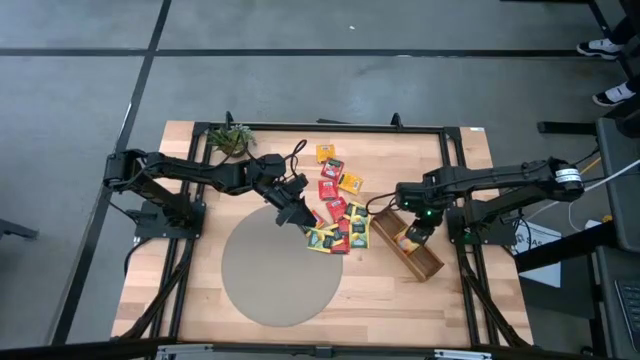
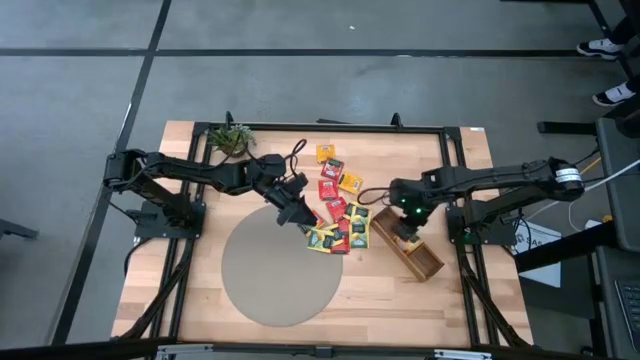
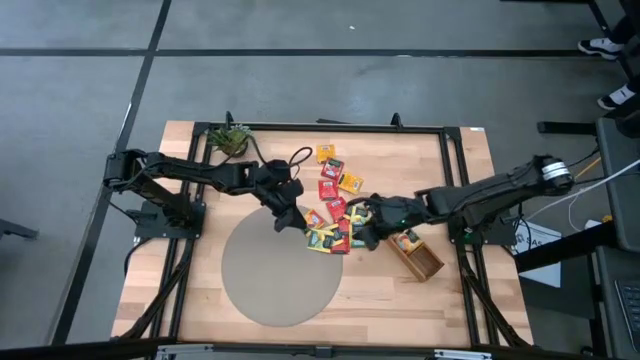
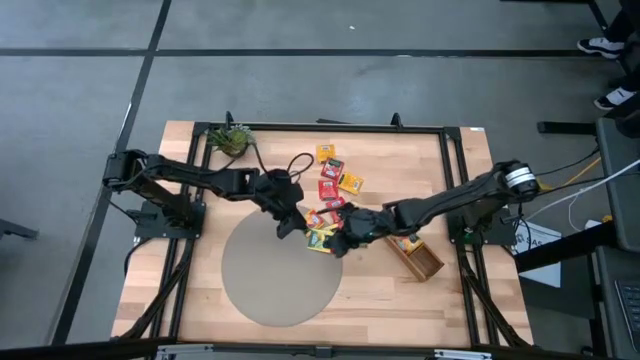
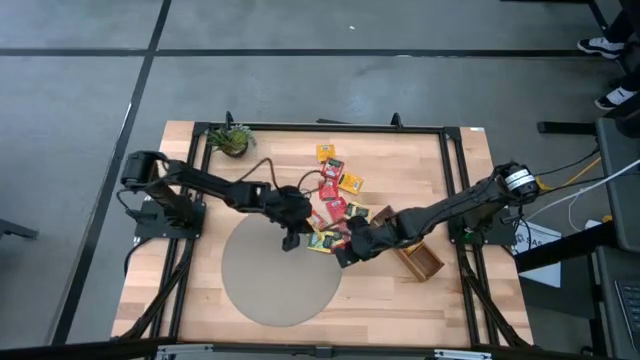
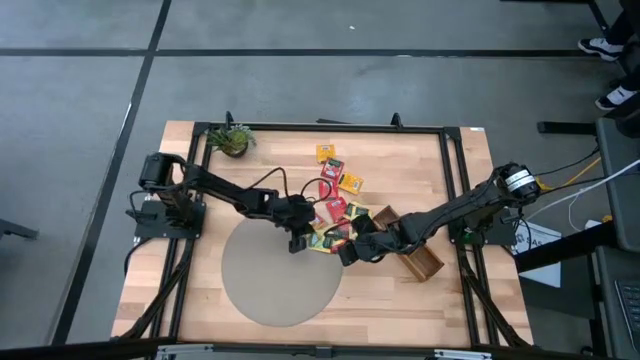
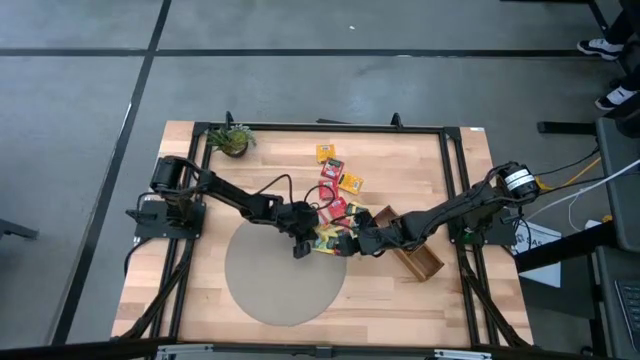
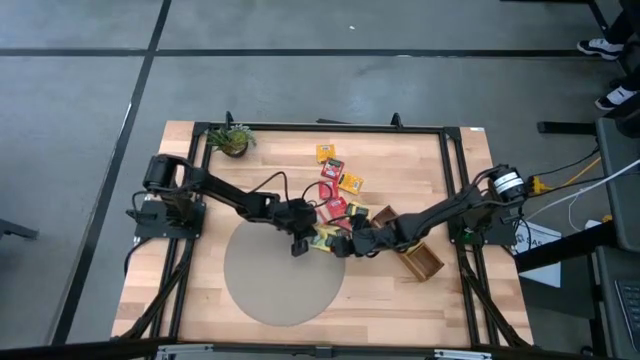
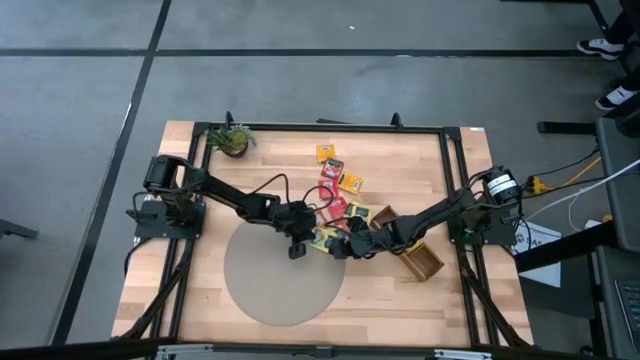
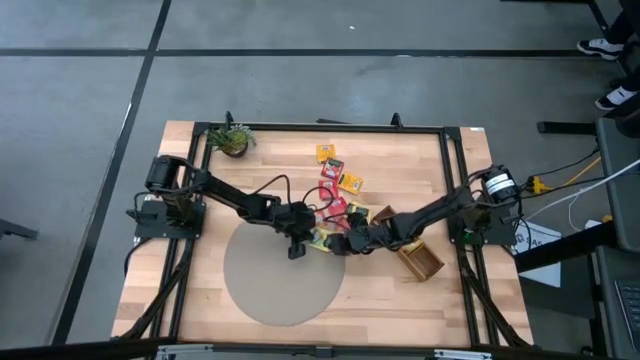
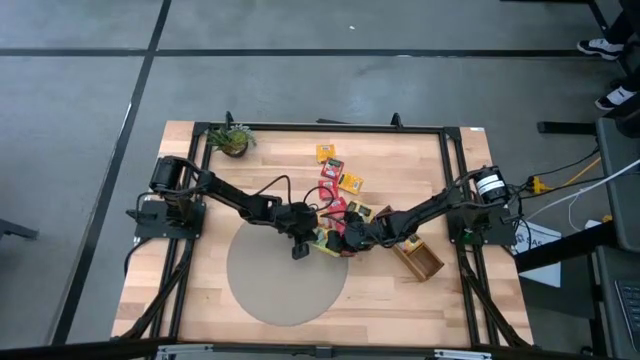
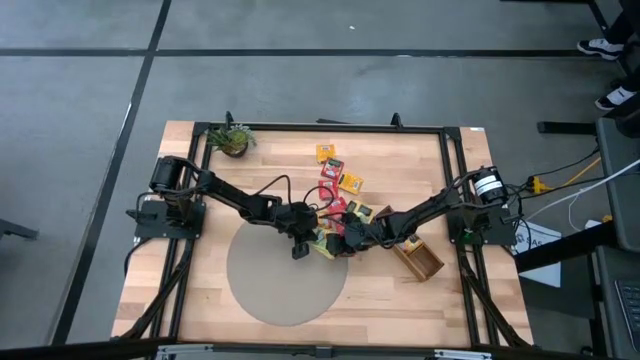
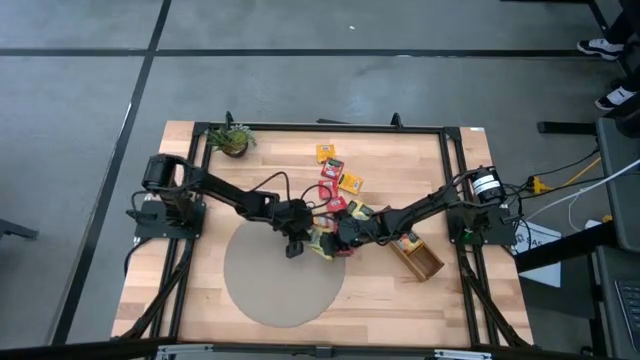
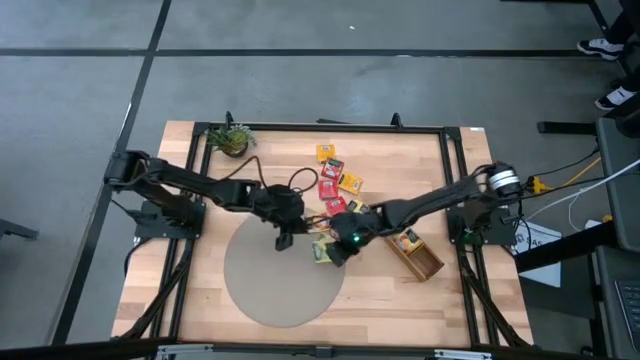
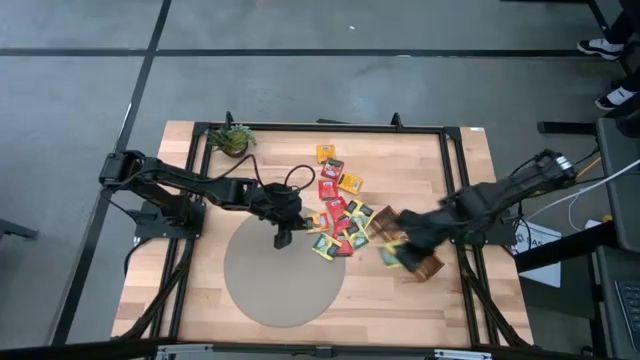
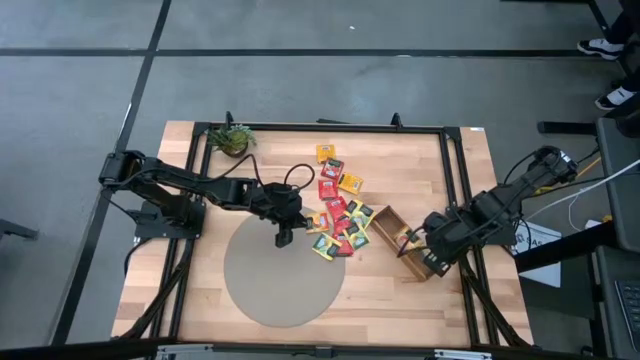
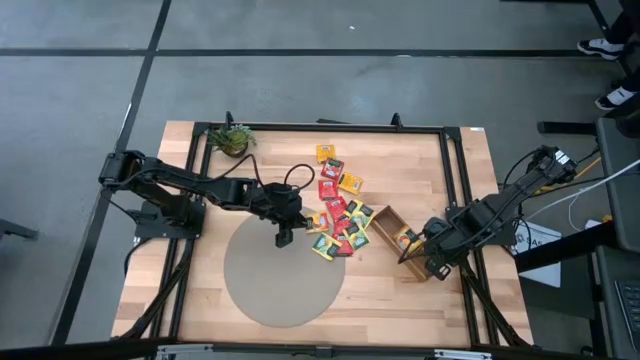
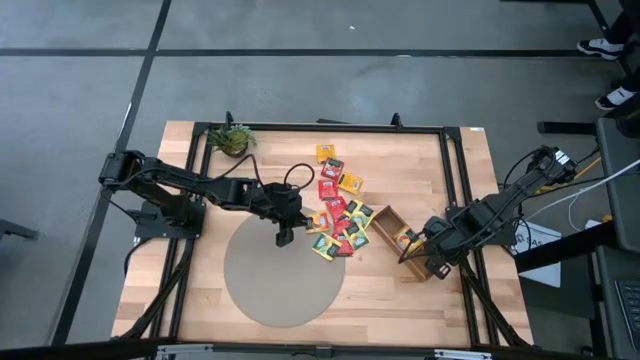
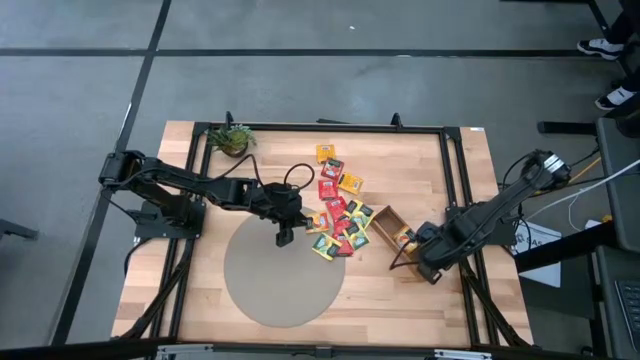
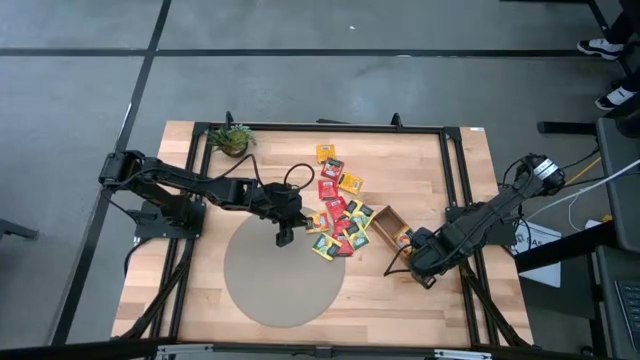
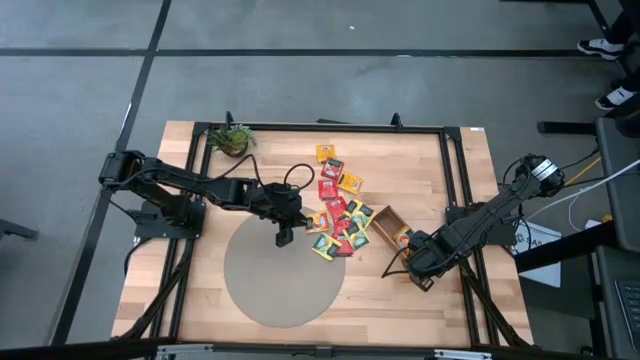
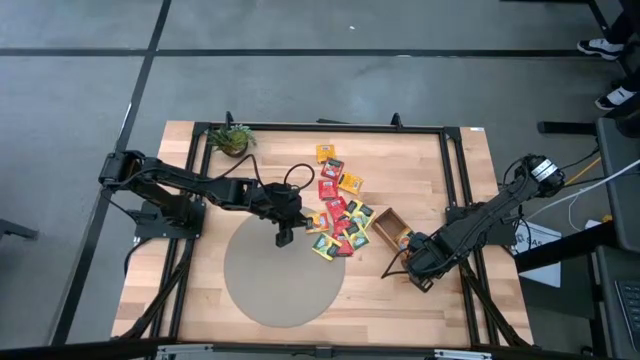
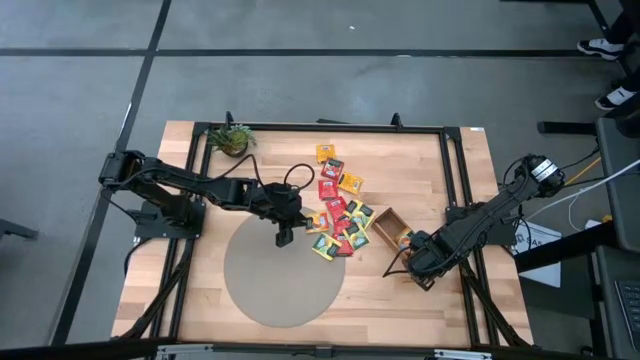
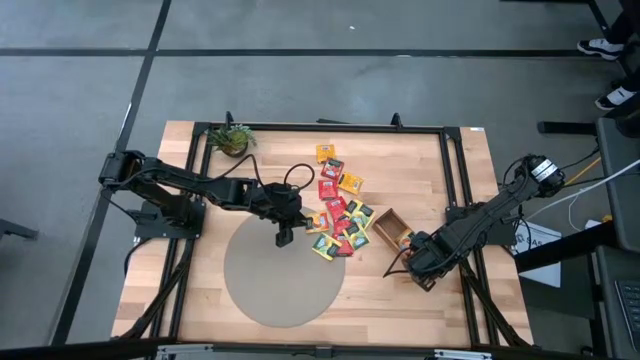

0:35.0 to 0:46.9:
Task: Pick & Place Tea
Put the yellow tea bag into the bottom section of the wooden organizer

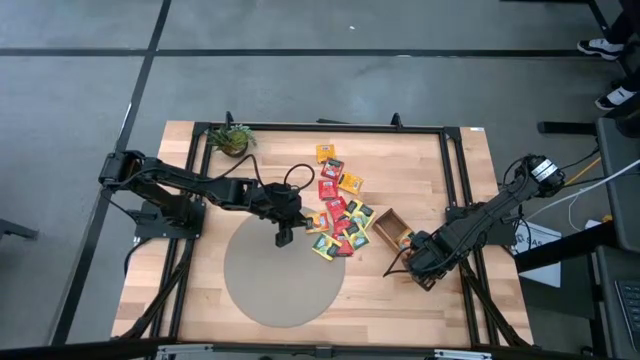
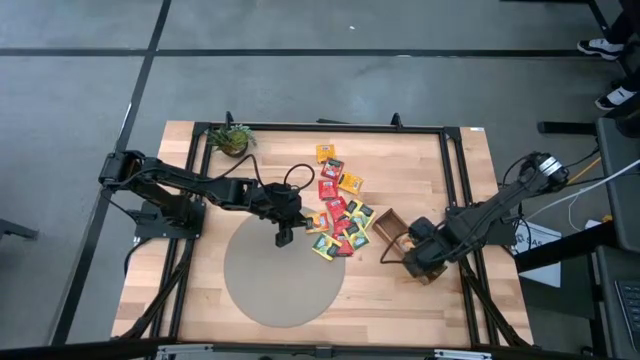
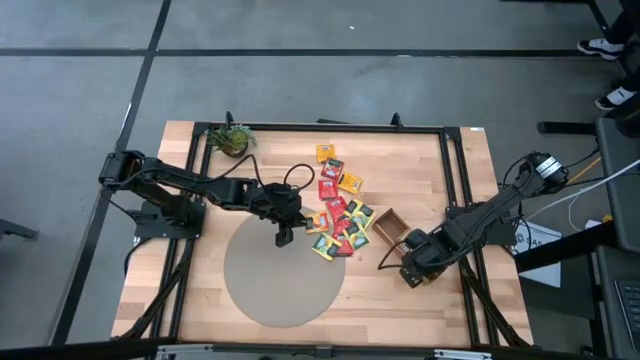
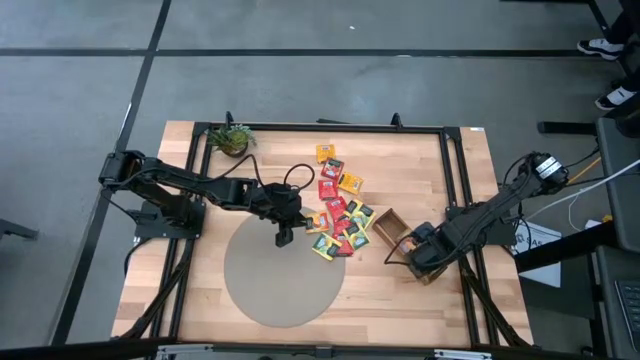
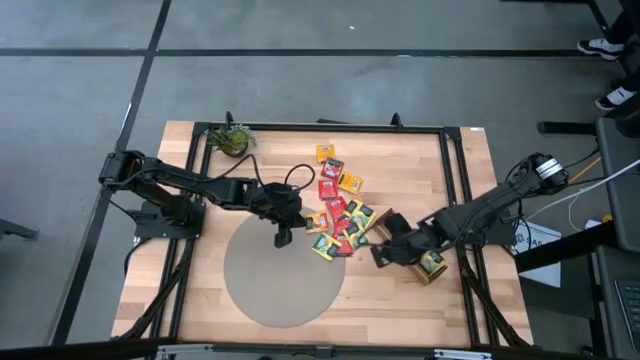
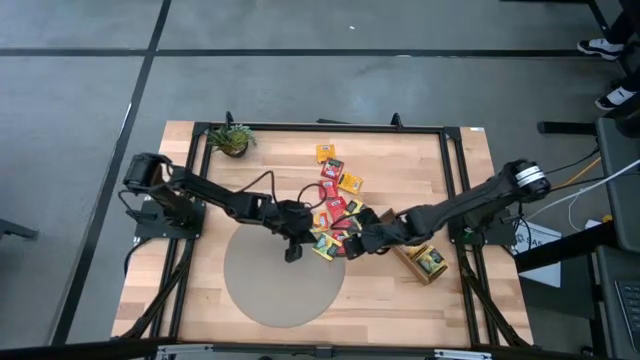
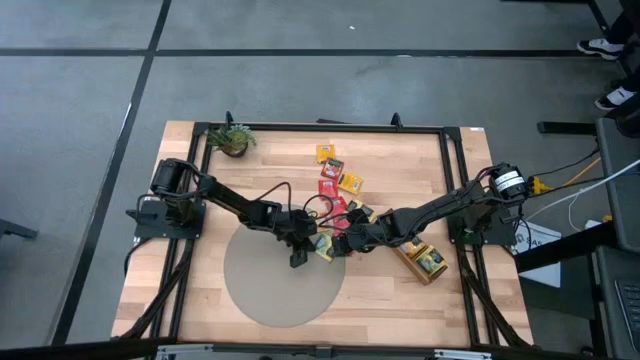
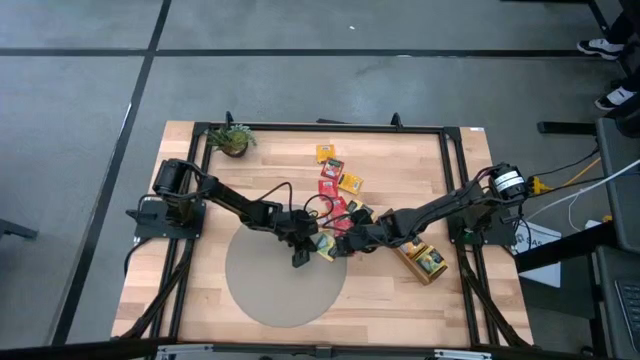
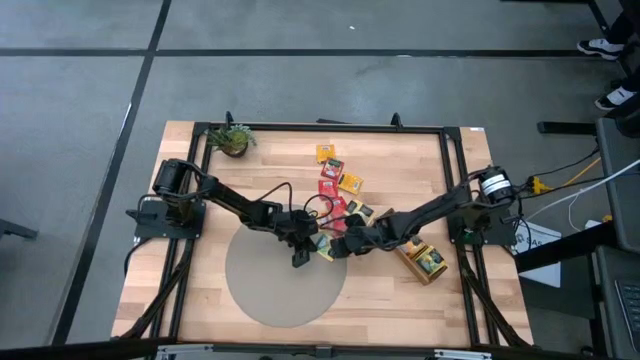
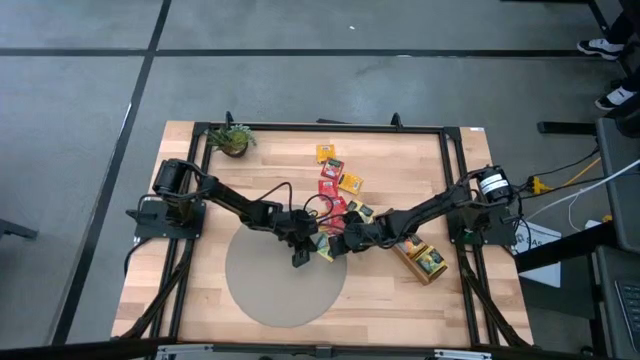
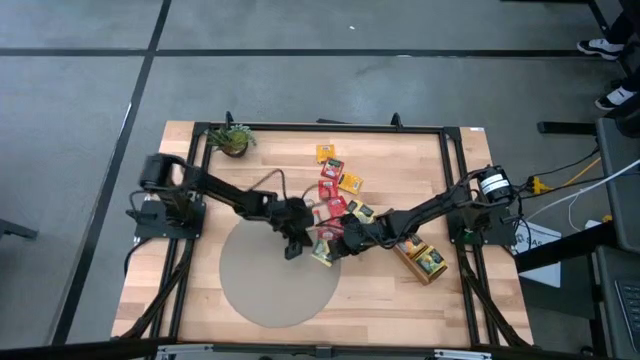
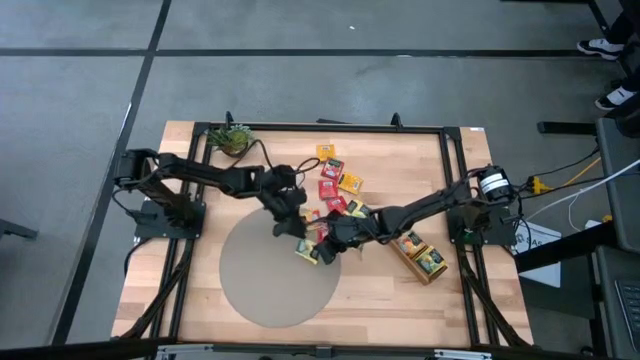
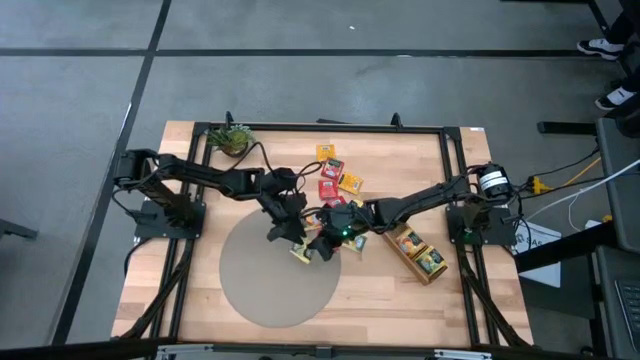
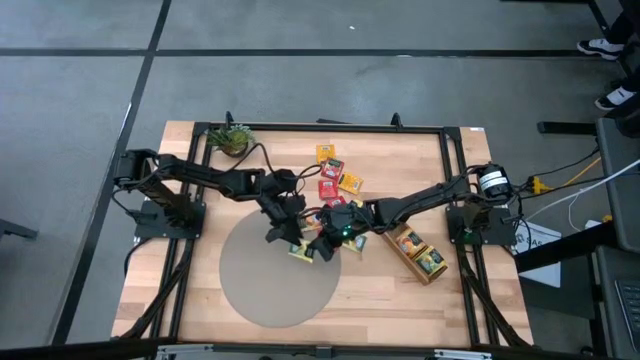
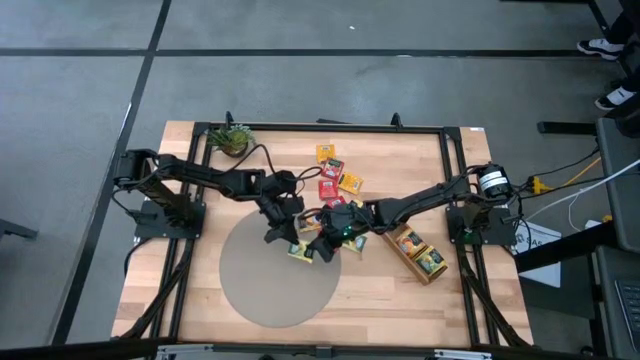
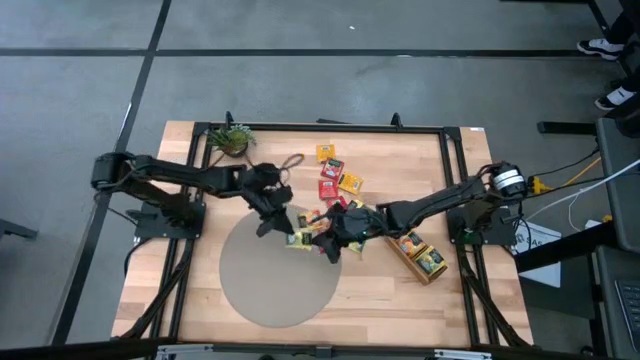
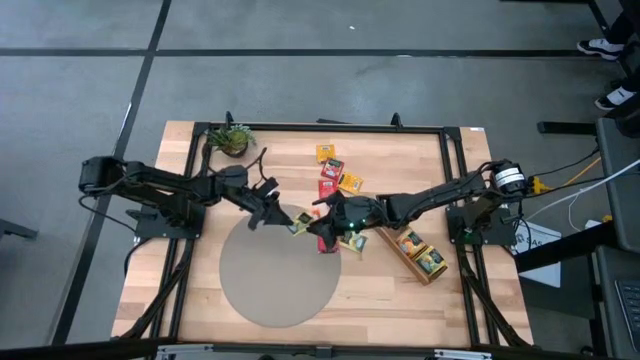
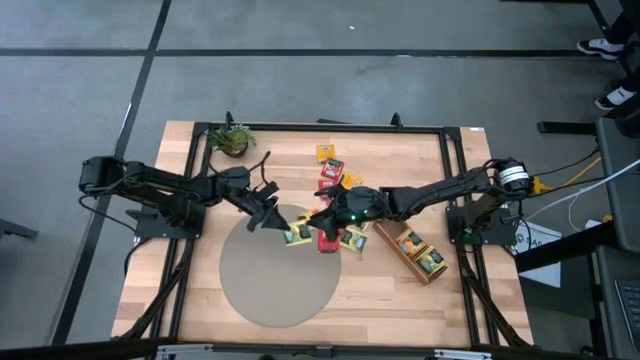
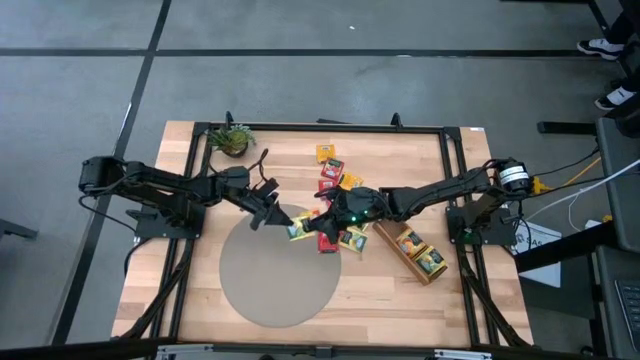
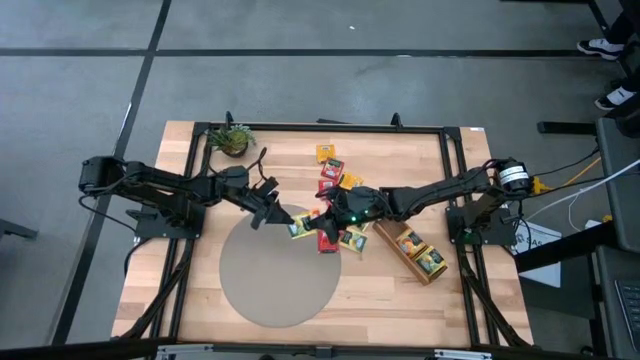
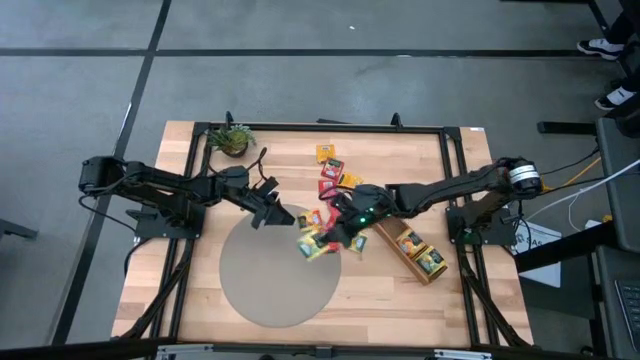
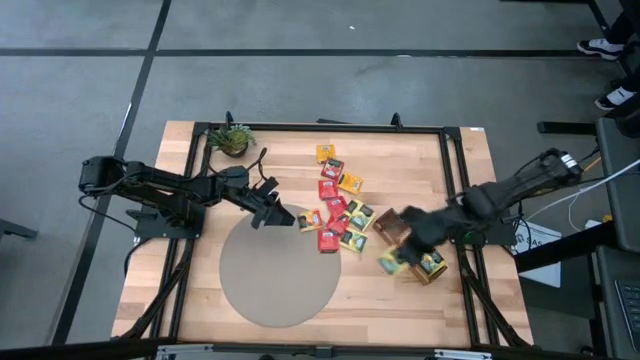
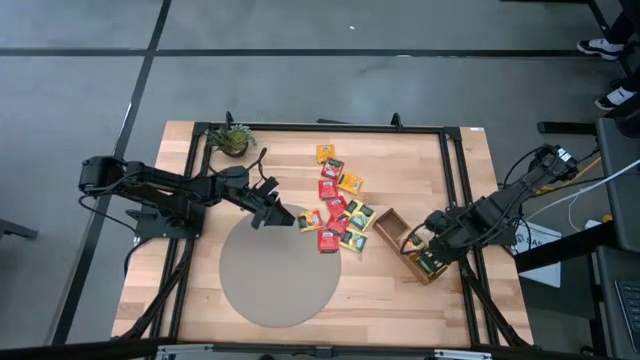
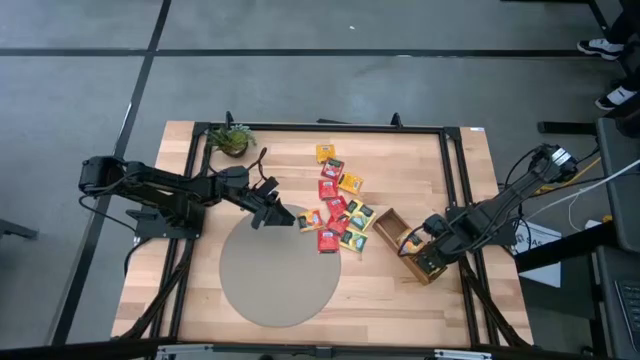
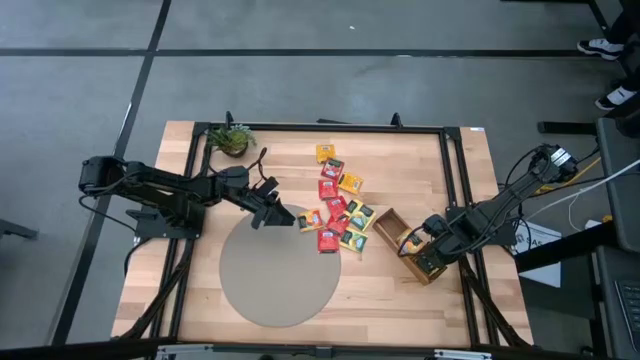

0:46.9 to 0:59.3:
Put the yellow tea bag into the bottom of the wooden organizer
